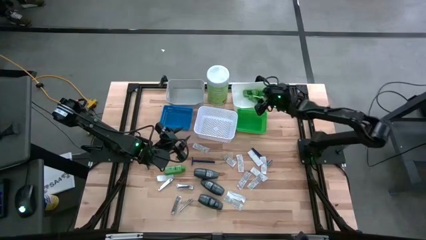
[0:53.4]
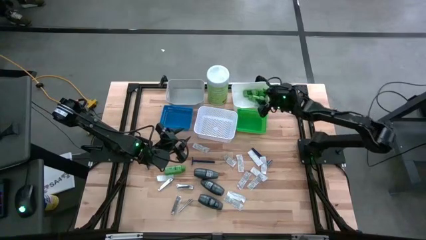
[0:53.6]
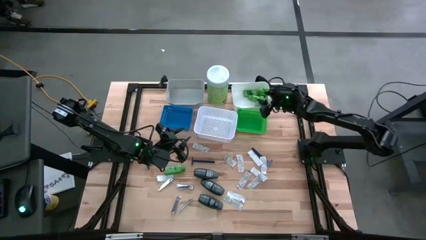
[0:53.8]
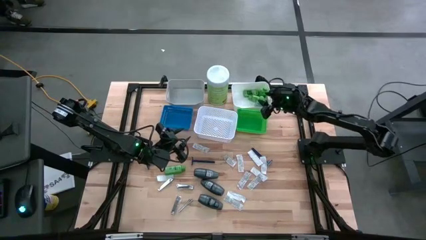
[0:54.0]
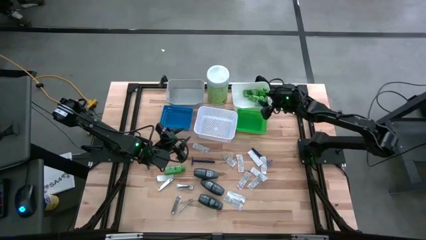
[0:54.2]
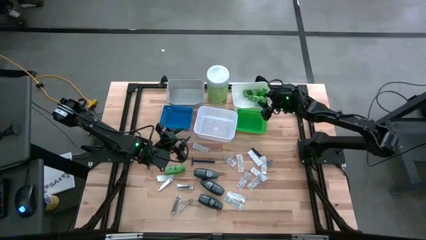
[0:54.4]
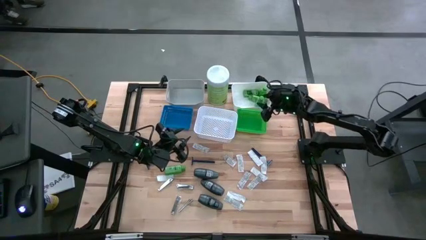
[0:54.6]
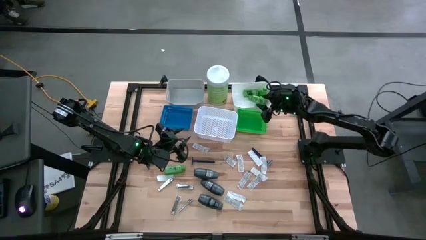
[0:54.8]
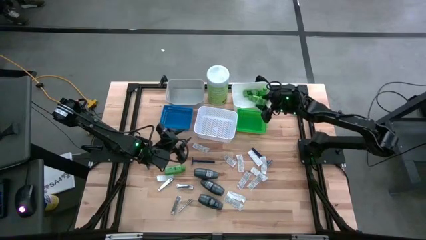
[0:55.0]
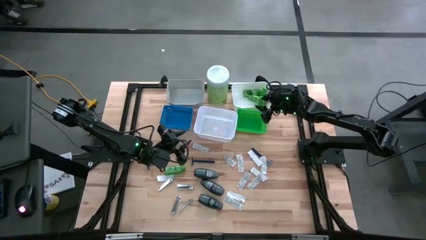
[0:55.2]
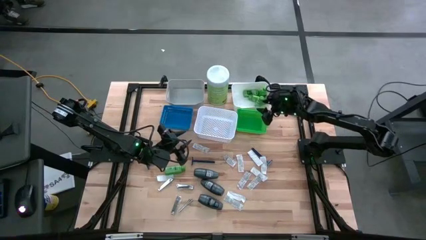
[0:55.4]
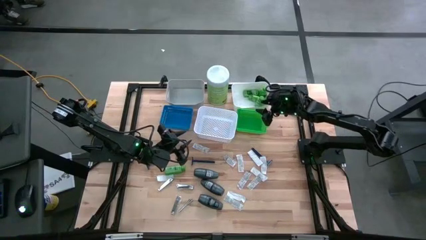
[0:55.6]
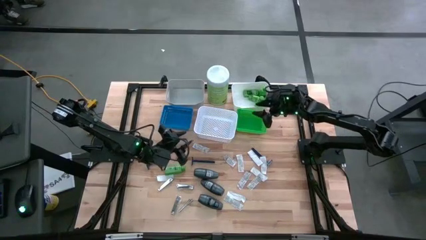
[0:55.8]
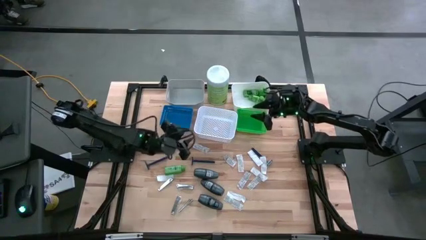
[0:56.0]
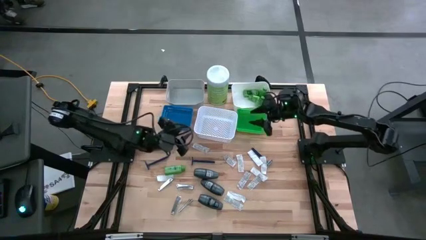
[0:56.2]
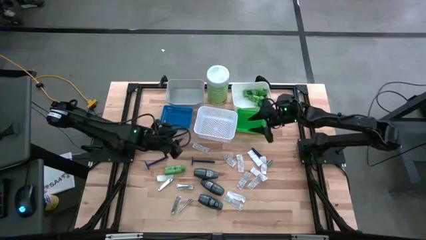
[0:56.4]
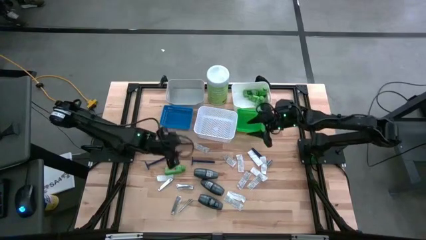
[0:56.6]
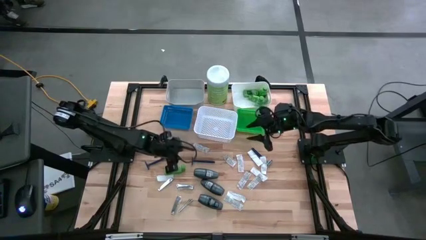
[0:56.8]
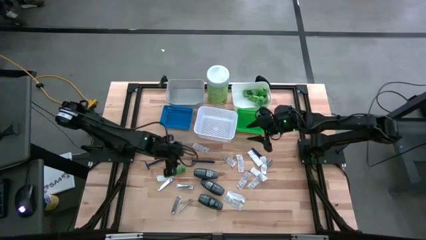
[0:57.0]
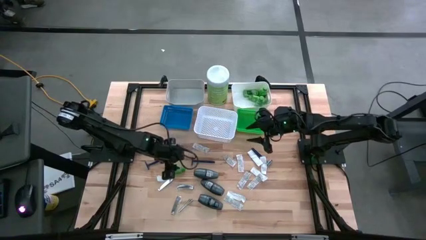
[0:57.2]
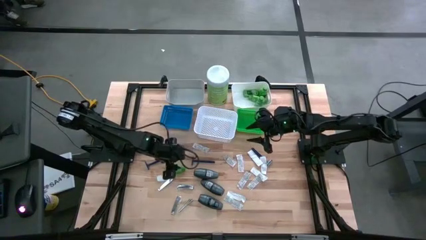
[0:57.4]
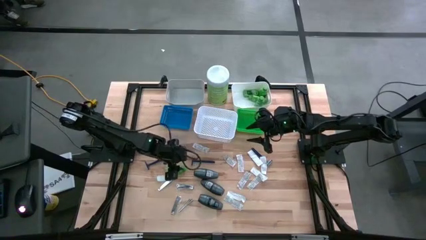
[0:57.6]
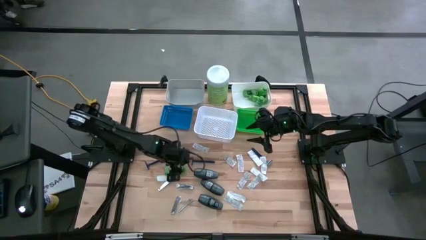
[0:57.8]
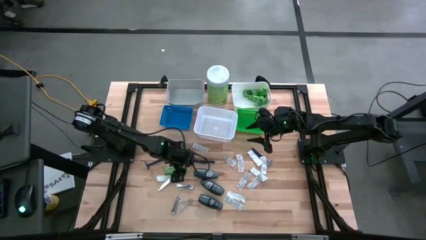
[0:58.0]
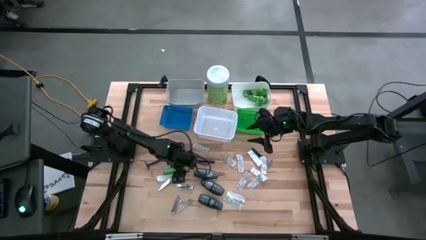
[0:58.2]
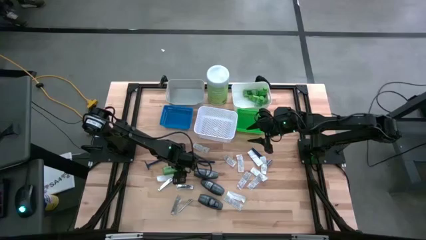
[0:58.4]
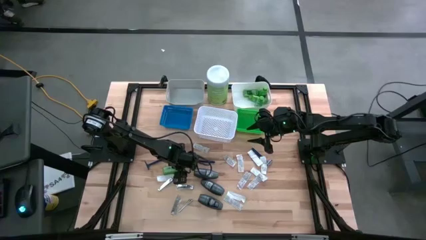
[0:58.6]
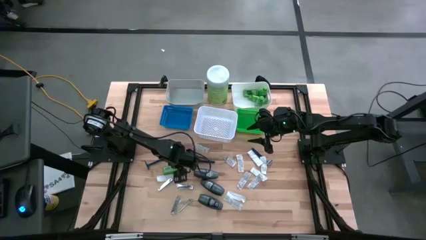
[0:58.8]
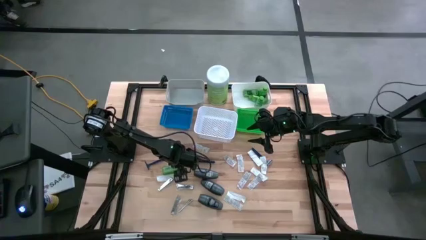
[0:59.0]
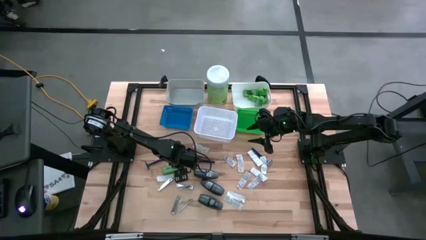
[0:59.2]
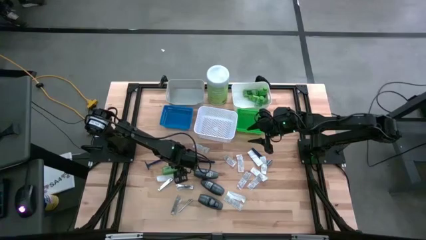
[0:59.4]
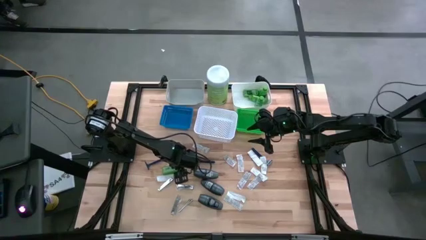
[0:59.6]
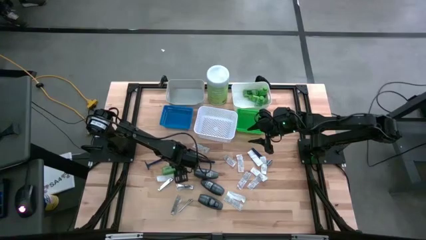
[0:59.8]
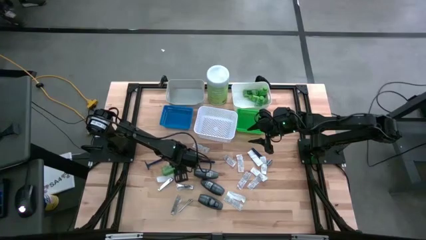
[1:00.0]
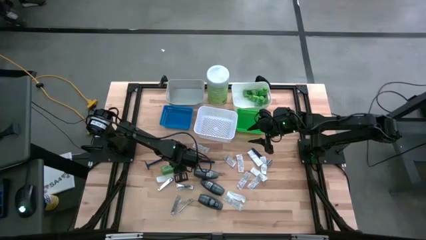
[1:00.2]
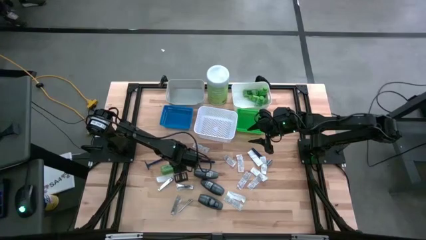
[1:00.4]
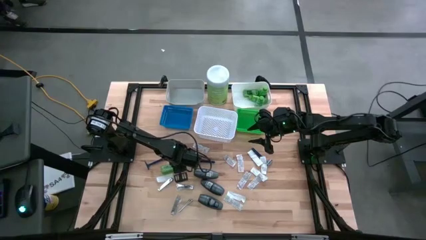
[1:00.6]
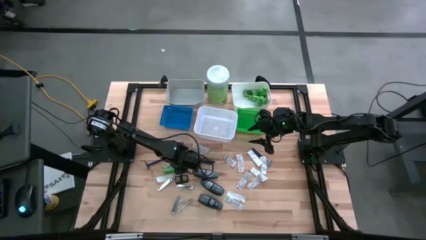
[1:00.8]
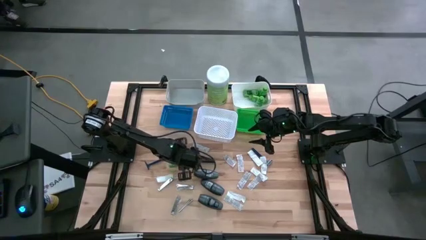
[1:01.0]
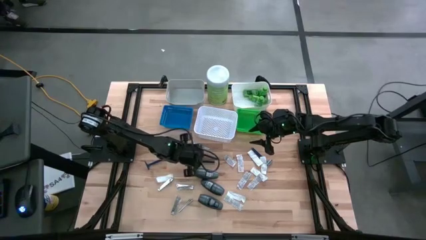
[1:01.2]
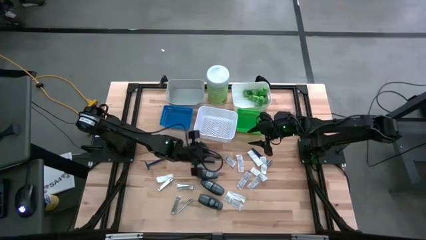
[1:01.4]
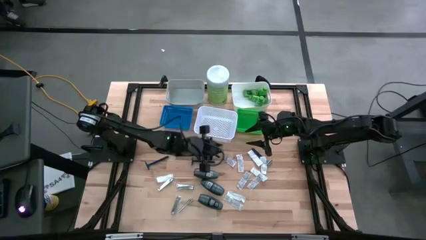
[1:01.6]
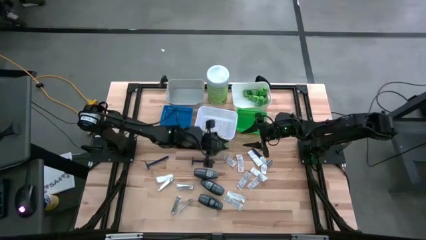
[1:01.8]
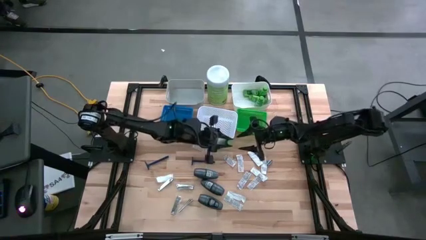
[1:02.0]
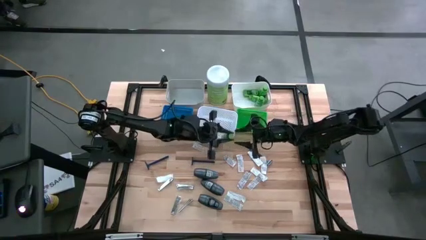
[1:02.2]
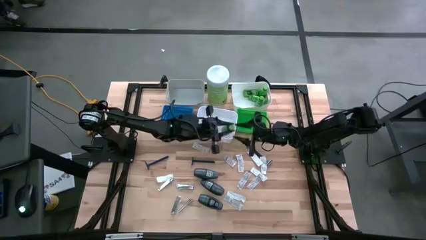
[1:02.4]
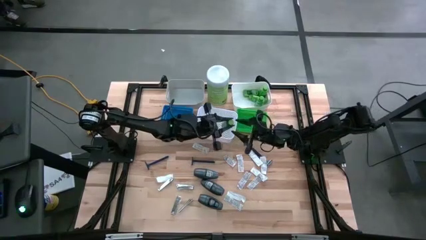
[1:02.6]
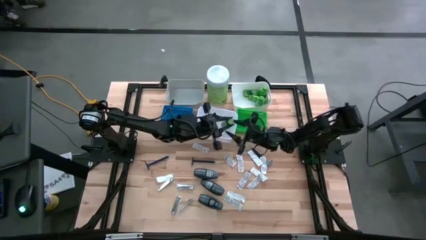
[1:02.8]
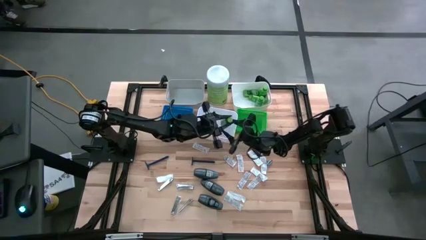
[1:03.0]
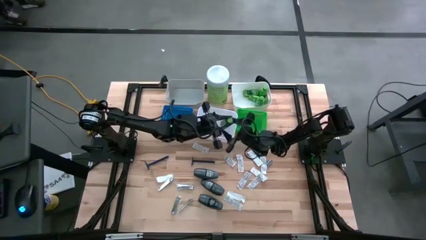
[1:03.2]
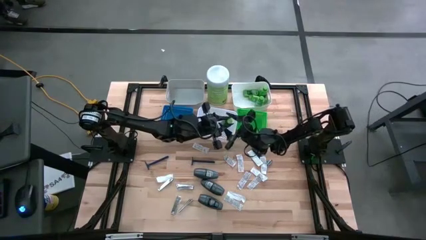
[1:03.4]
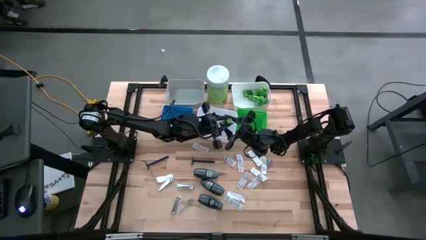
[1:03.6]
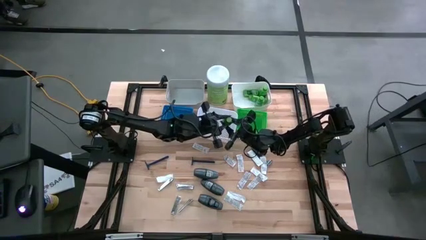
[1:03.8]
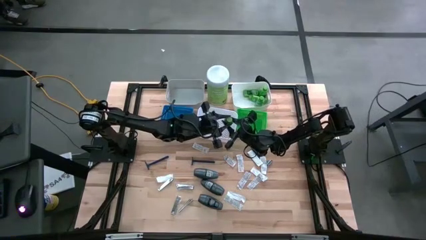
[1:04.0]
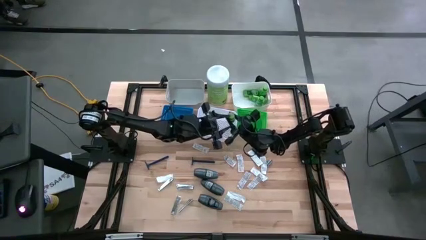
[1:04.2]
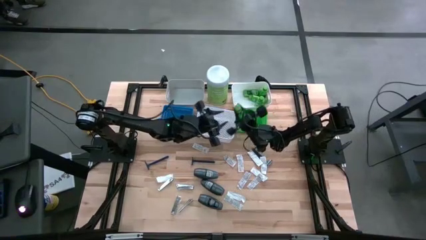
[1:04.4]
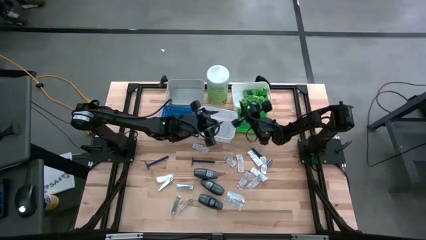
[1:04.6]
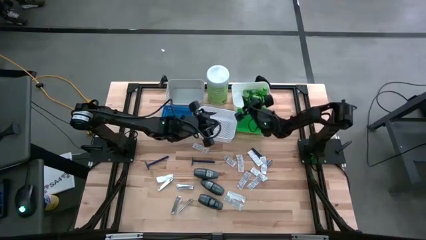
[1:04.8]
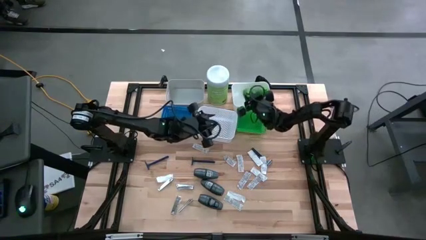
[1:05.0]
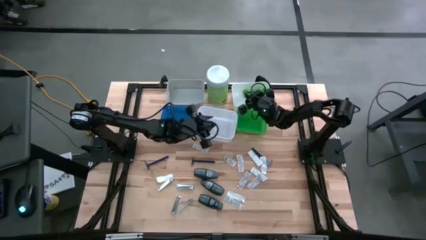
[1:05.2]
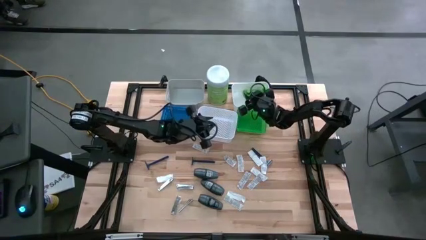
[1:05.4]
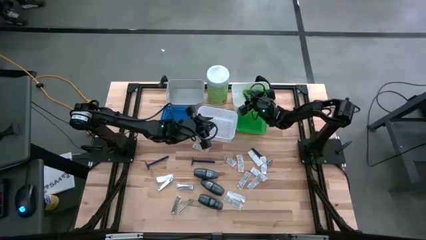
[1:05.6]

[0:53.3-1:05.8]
Task: Pick & Place Travel size toiletries
Put the green shampoo into the small white bin
